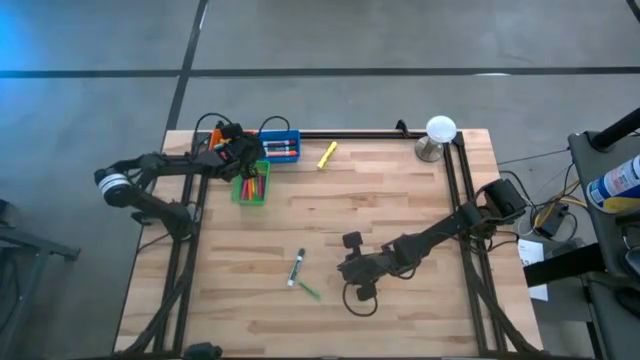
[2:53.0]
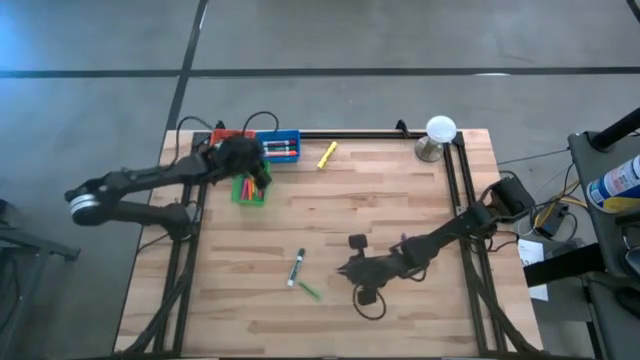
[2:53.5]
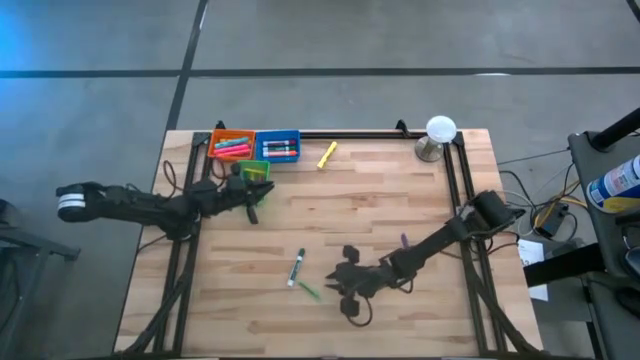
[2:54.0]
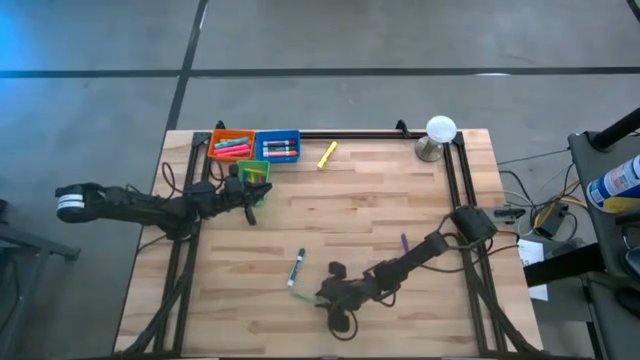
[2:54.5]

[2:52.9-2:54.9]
Task: Pick & Place Markers
Put the green pen into the green bin

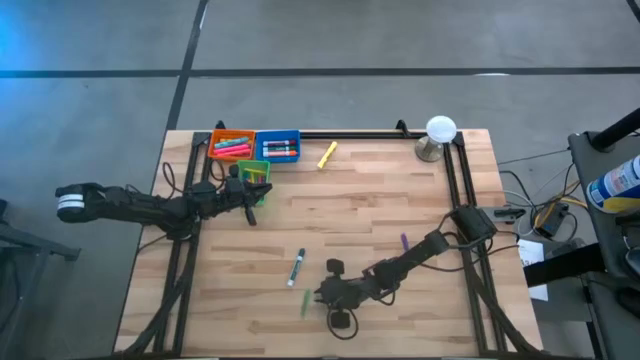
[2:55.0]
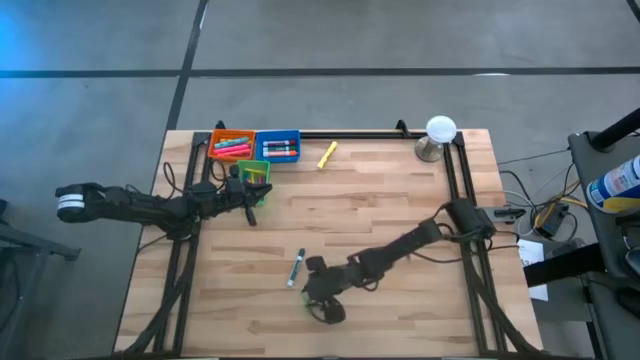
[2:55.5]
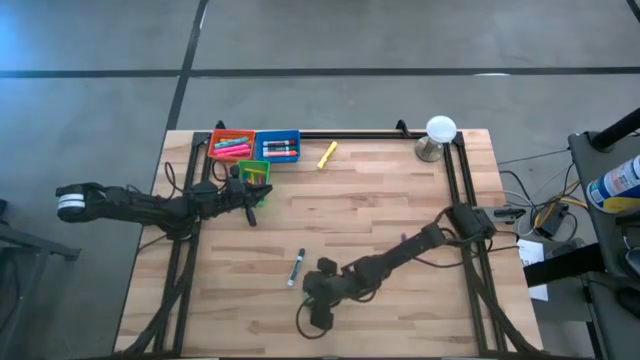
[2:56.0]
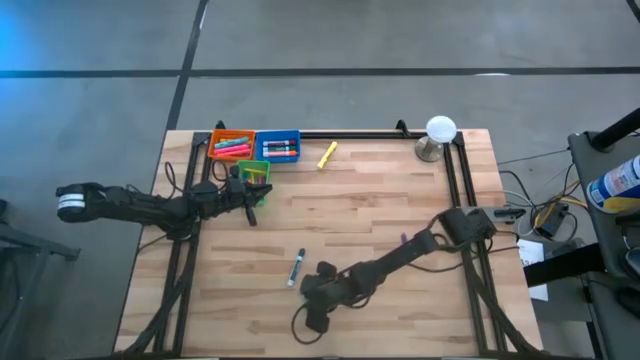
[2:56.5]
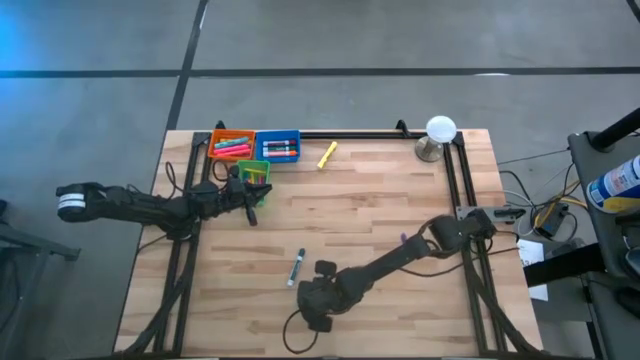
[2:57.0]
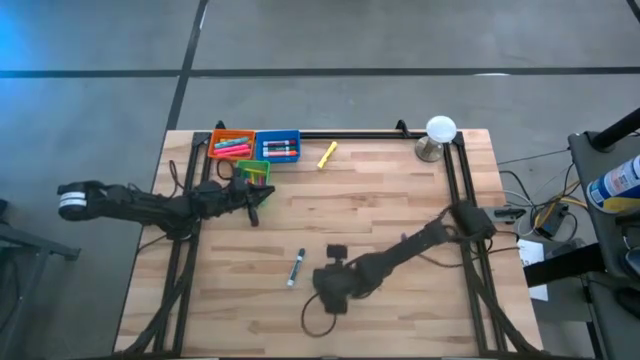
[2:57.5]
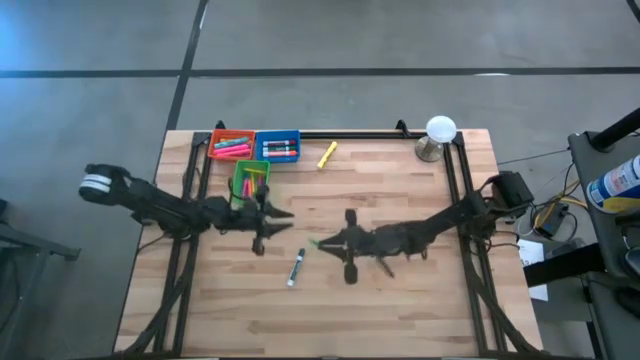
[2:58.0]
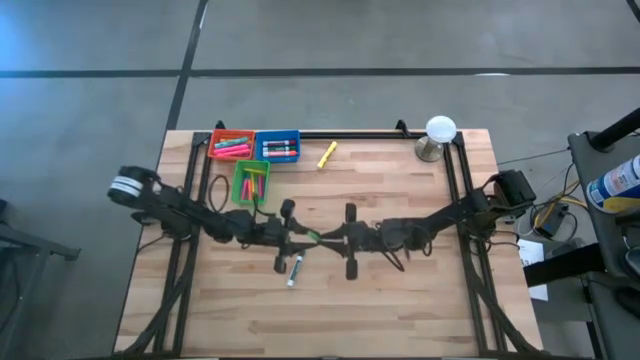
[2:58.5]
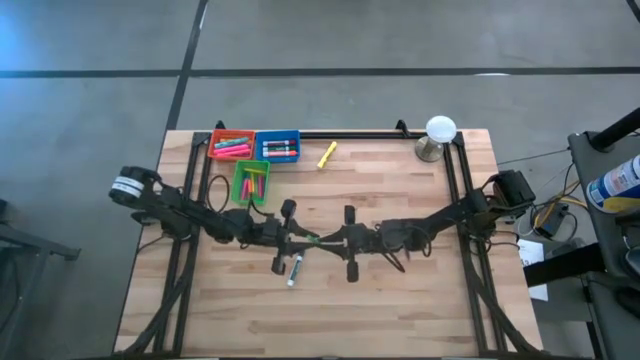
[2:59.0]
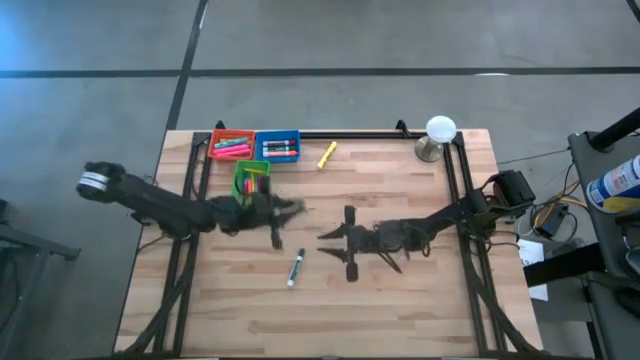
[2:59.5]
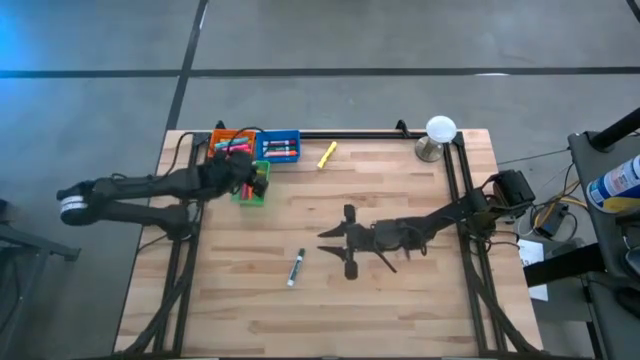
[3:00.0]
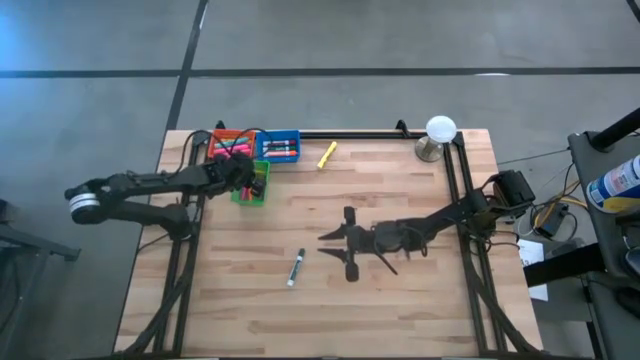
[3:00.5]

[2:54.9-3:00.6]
Put the green pen into the green bin

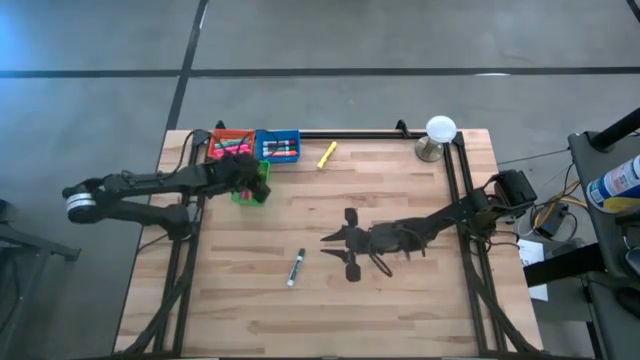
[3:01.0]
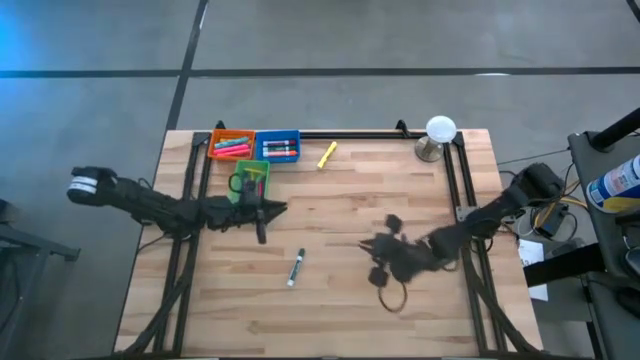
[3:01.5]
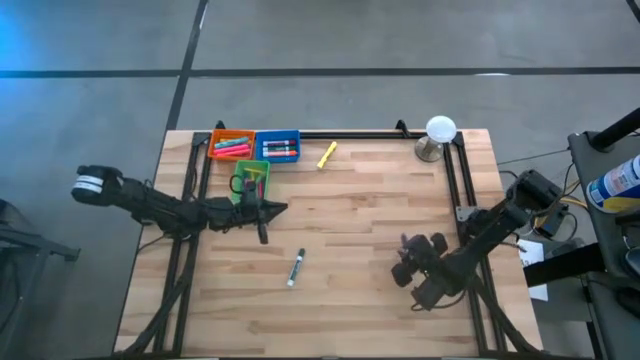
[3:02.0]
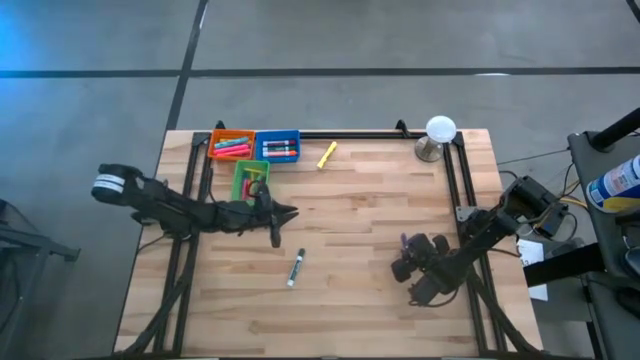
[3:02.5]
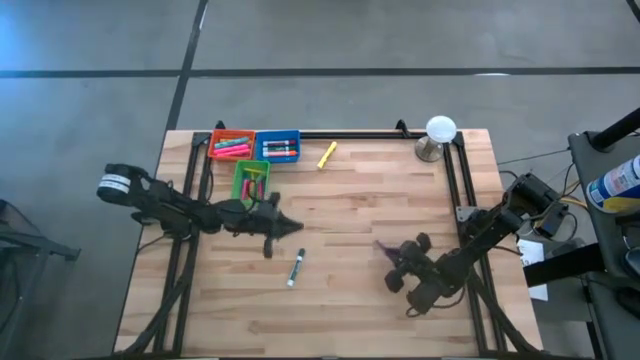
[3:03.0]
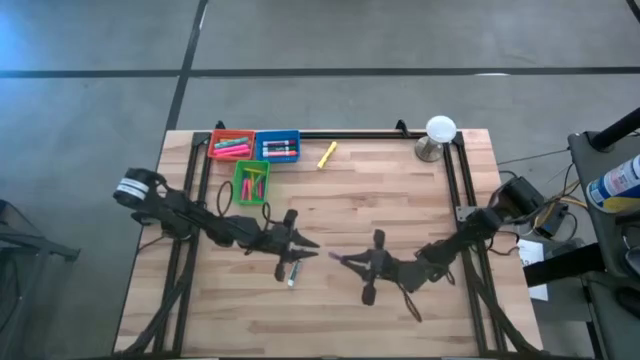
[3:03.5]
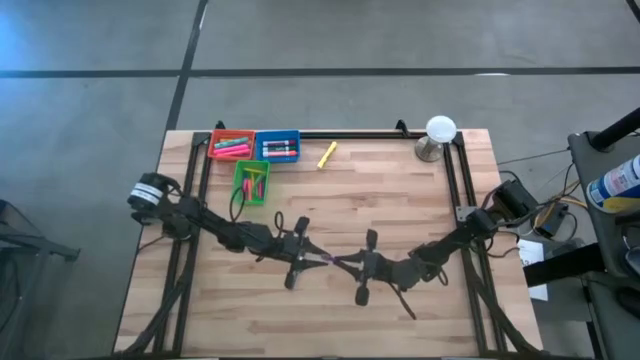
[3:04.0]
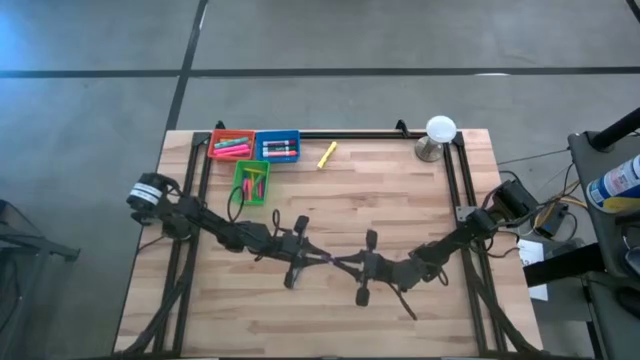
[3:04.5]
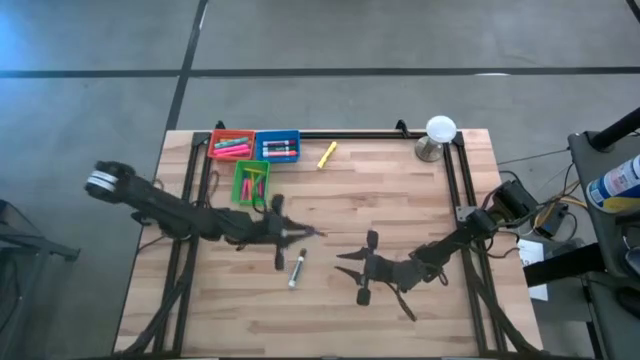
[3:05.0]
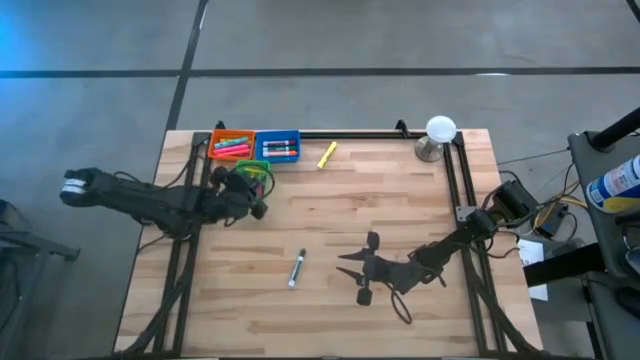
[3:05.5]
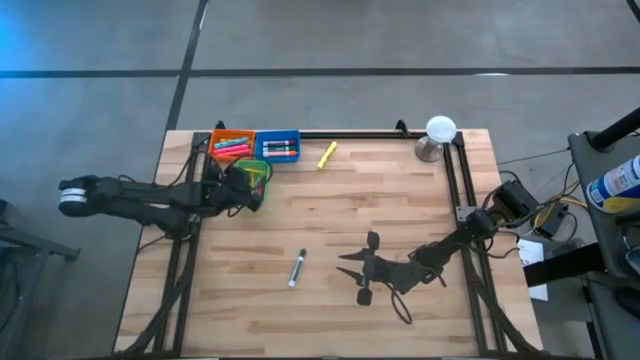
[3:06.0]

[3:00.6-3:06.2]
Put the purple pen into the green bin

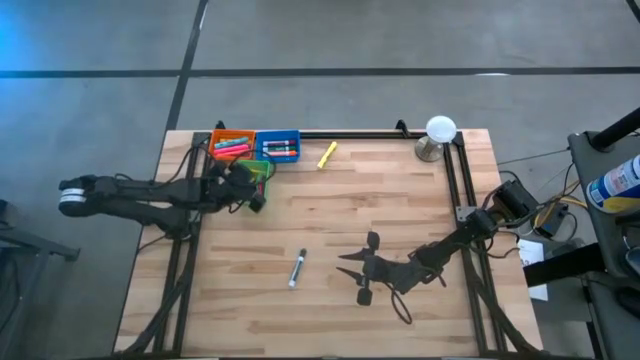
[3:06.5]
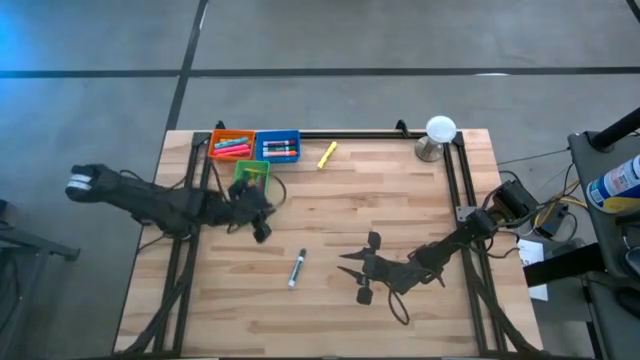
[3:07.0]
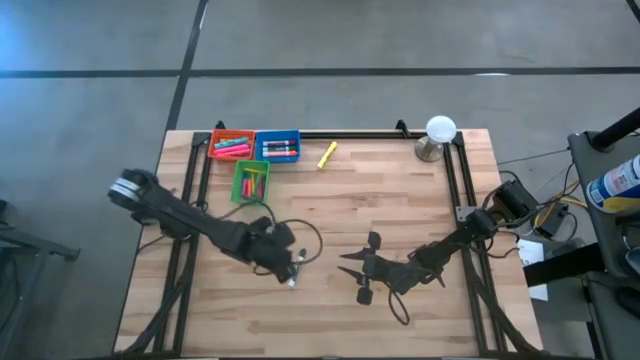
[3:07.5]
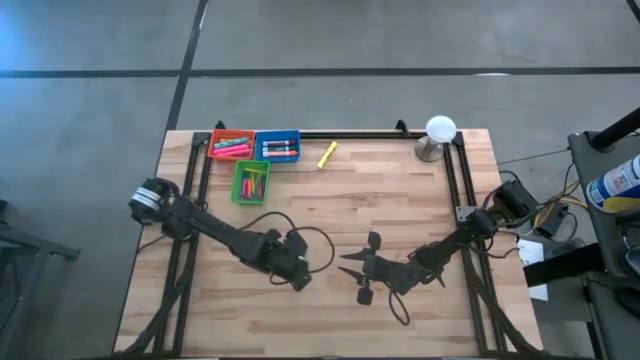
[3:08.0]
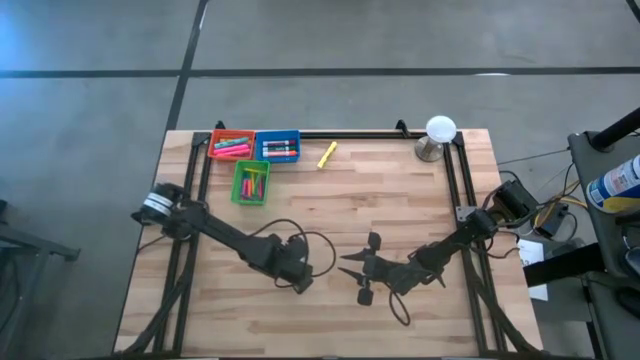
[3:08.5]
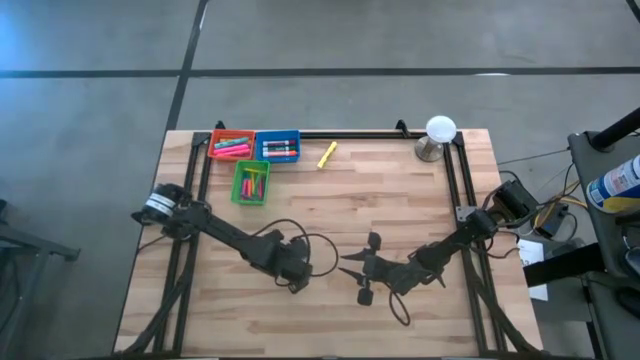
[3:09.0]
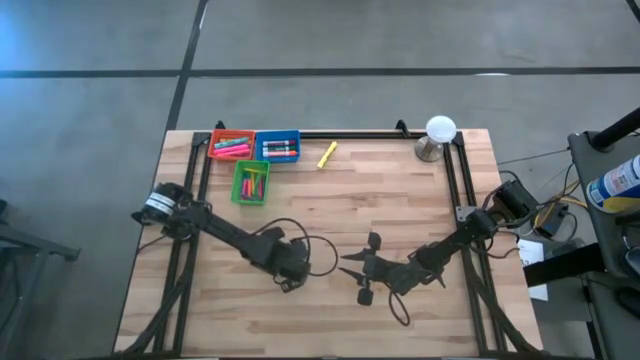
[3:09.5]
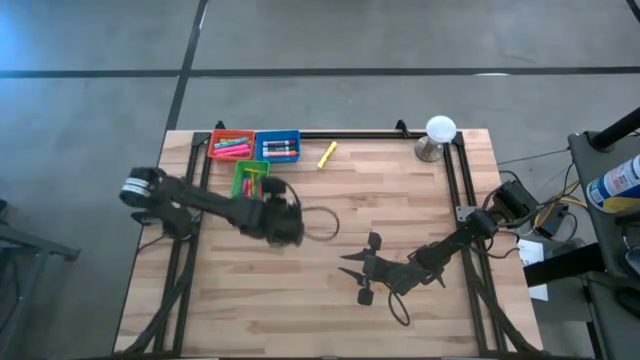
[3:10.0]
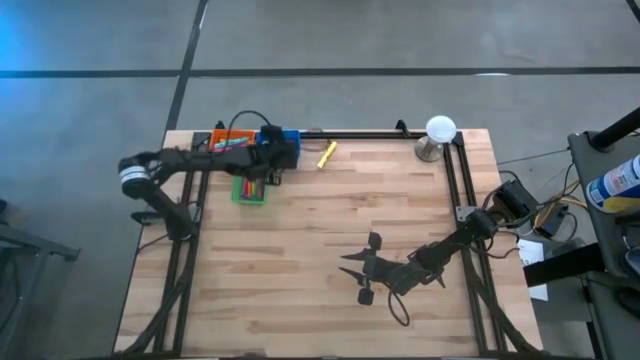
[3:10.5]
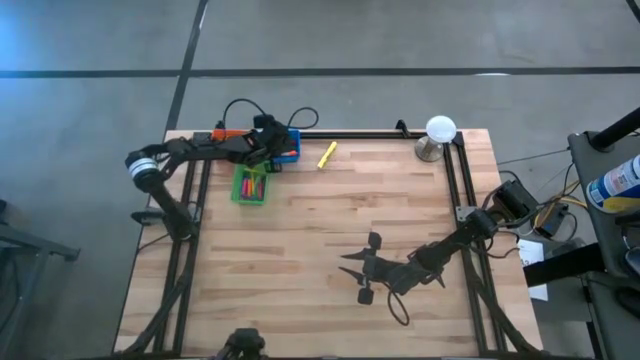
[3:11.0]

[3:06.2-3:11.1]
Put the green marker into the blue bin

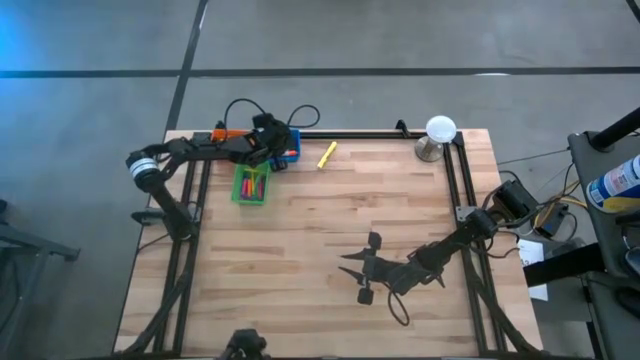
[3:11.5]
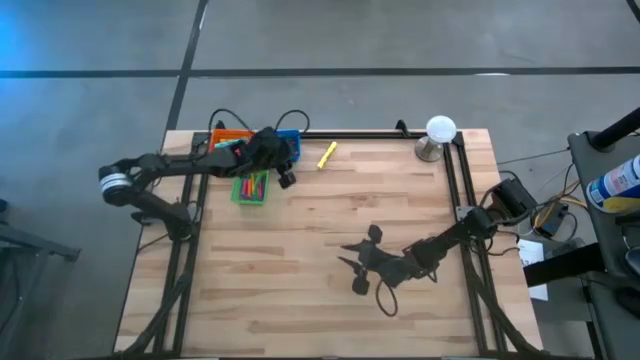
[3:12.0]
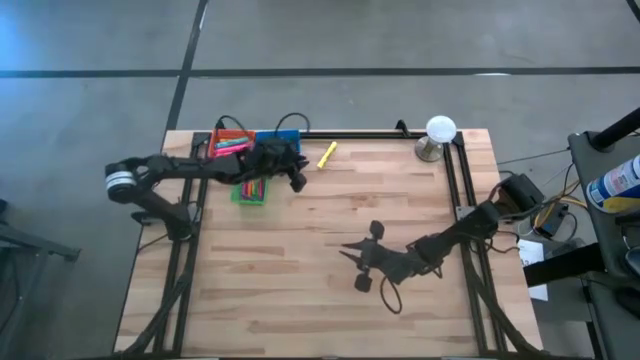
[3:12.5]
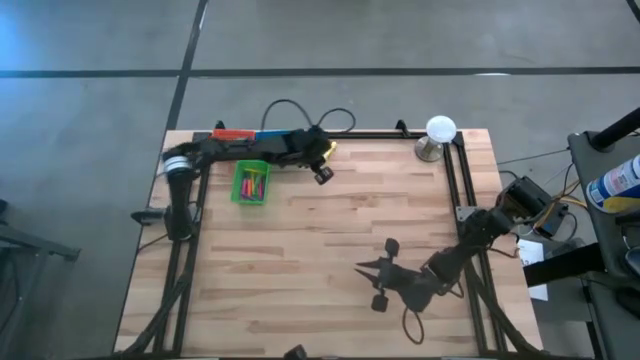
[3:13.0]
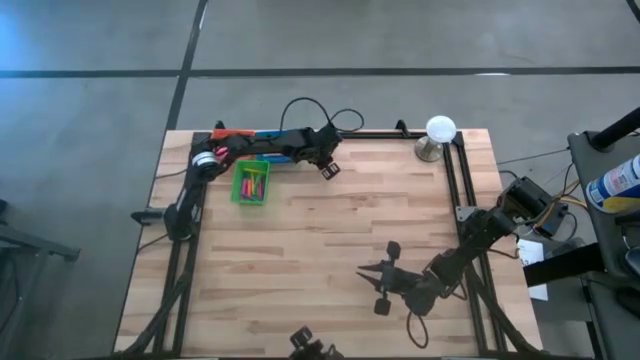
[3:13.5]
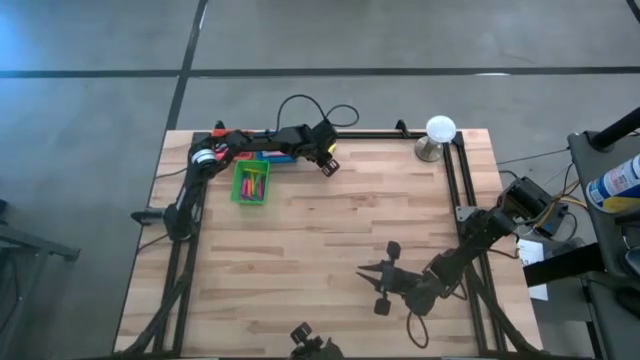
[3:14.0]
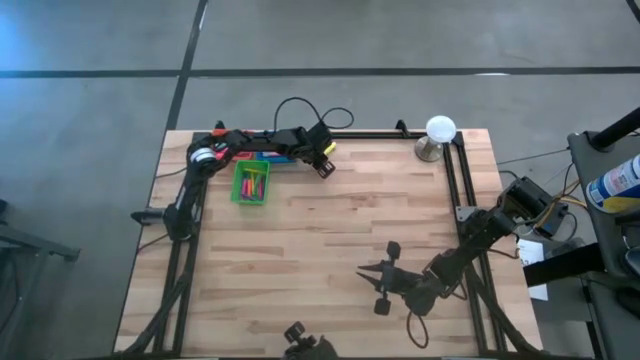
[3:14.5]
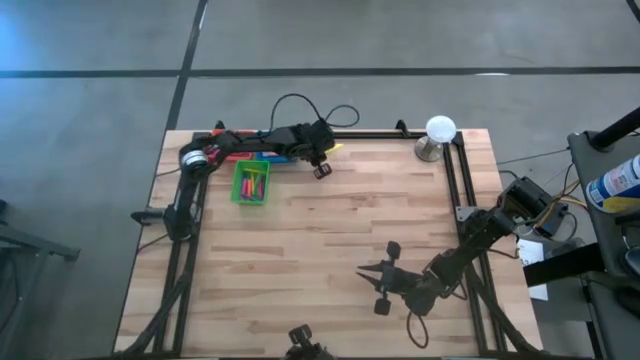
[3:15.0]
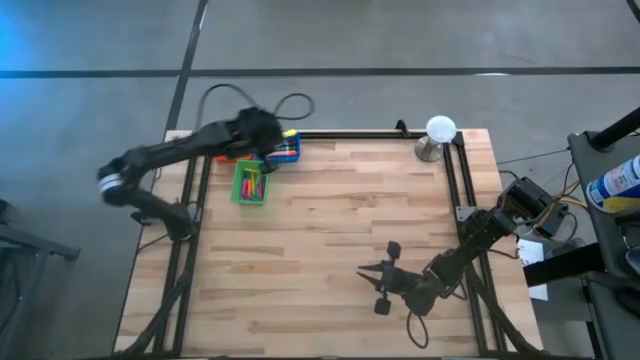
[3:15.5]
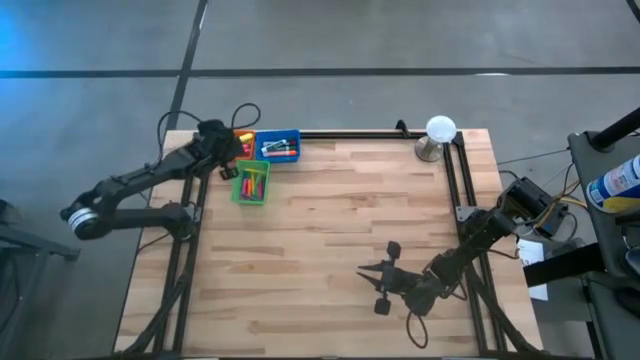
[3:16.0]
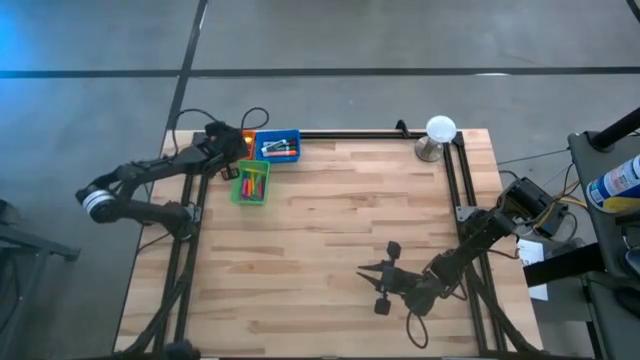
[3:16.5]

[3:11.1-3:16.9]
Put the yellow highlighter into the orange bin
